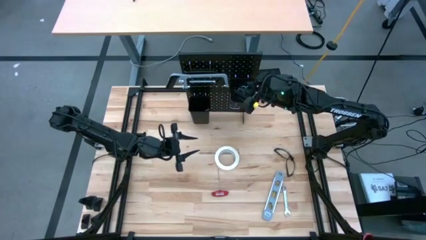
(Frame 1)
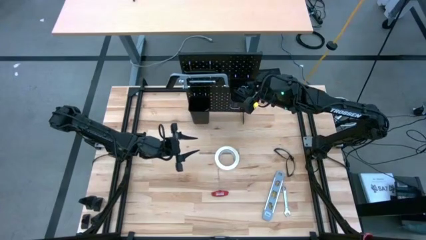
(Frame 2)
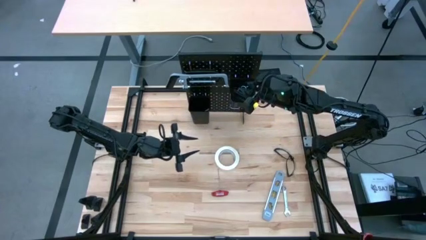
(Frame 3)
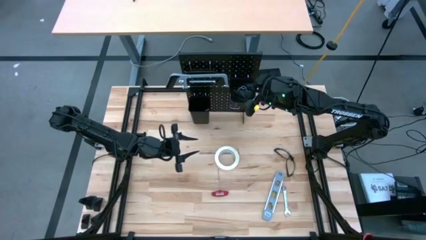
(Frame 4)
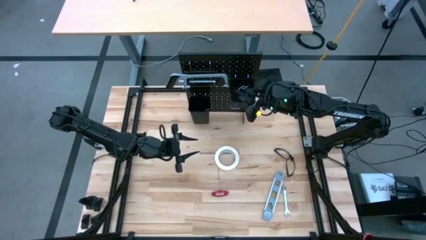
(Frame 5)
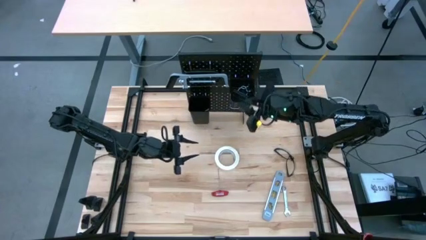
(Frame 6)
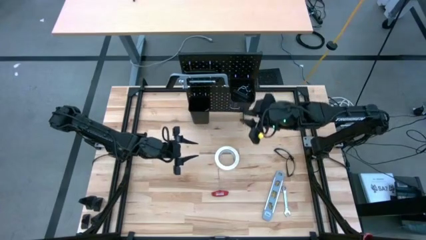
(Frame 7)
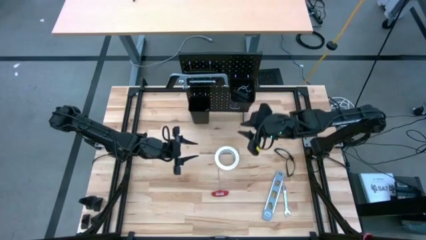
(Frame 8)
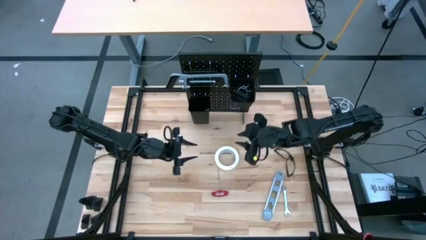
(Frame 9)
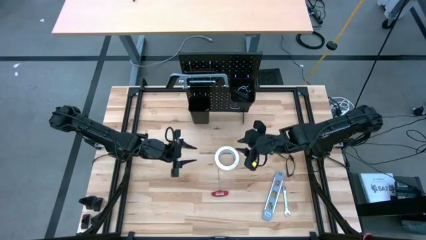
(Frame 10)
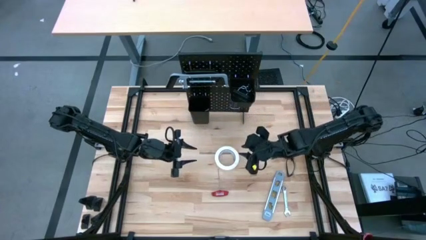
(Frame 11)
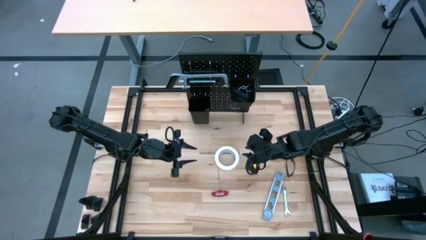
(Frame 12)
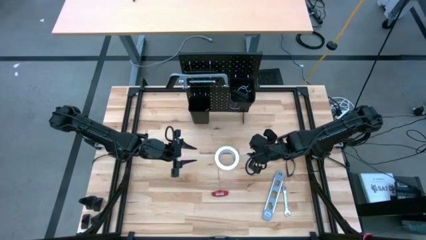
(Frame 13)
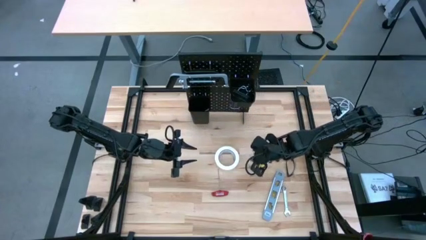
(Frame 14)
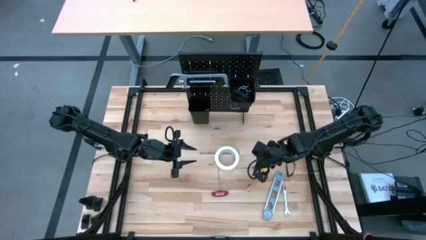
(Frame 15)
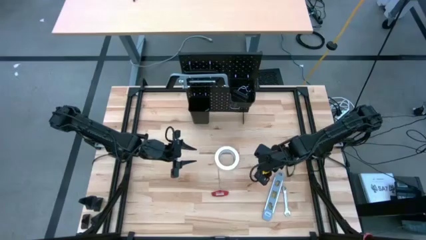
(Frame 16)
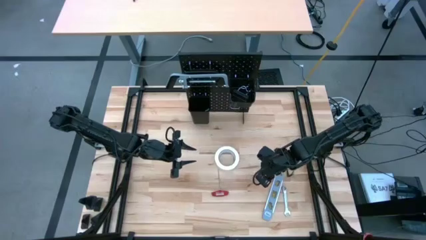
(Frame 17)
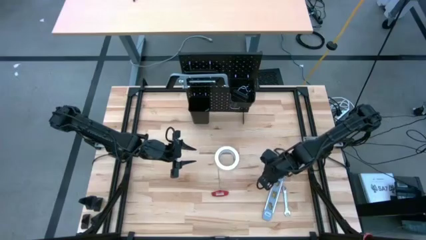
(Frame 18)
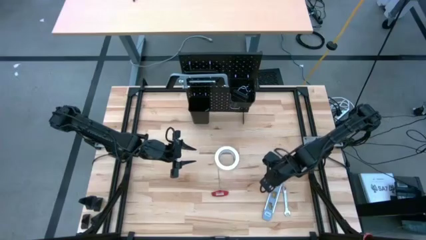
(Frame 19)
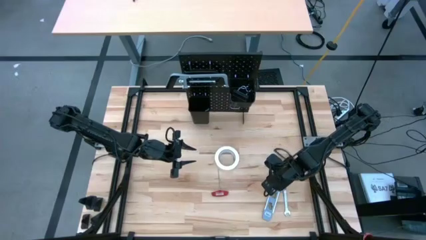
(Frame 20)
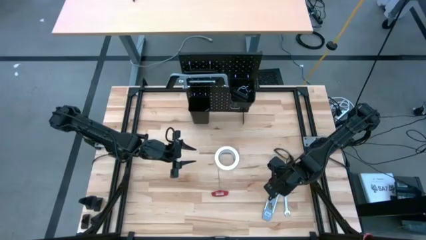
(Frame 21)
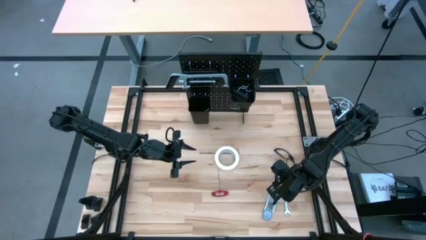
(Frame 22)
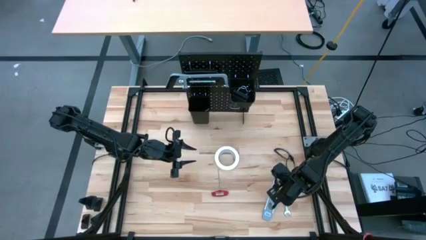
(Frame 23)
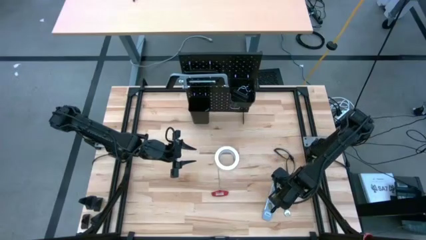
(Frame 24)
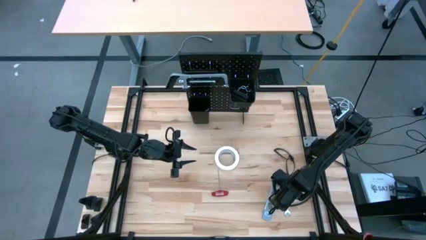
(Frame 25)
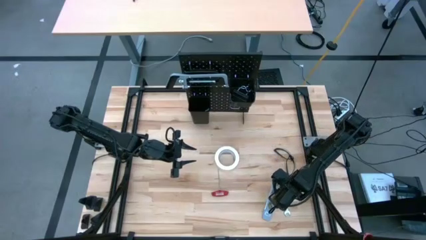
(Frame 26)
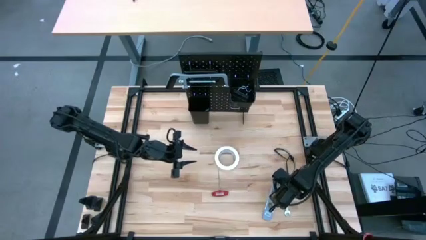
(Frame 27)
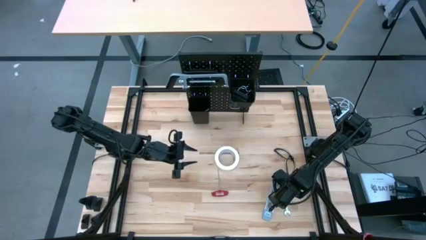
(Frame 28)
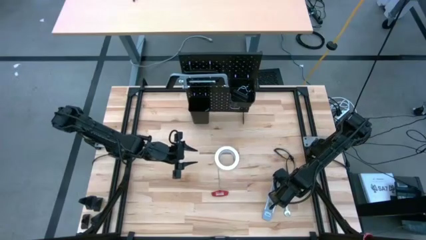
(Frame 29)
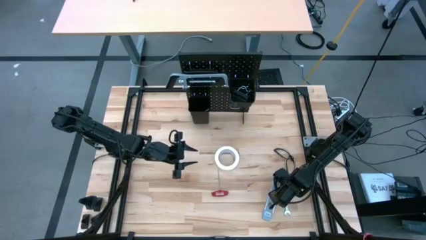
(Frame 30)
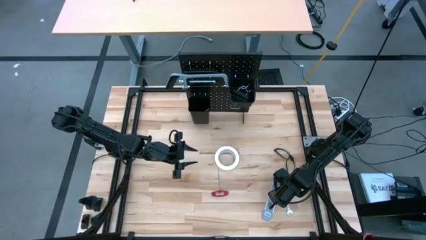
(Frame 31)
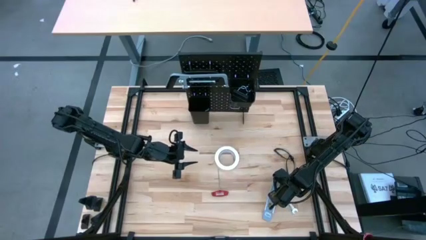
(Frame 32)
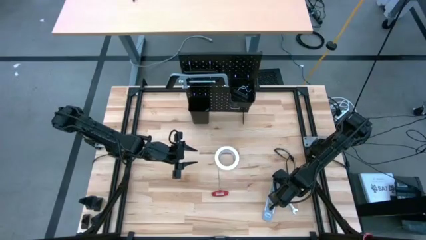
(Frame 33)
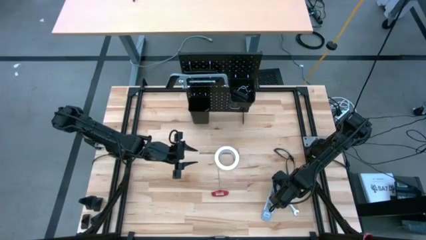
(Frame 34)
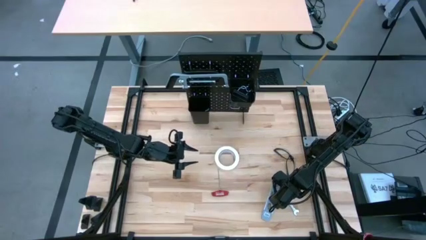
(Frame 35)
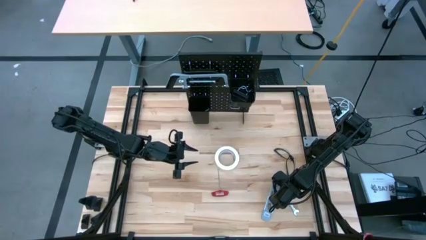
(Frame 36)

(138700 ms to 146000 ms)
Task: Hang tools onto peg board
Put the silver wrench into the right black tool bin

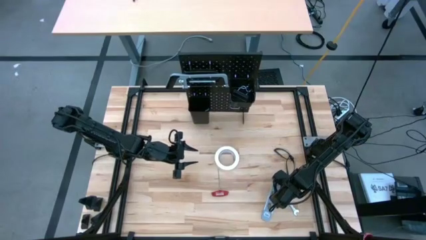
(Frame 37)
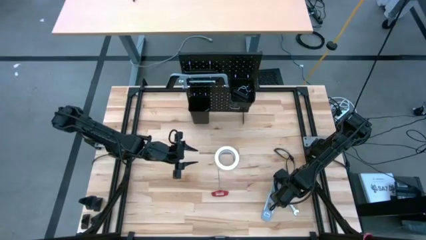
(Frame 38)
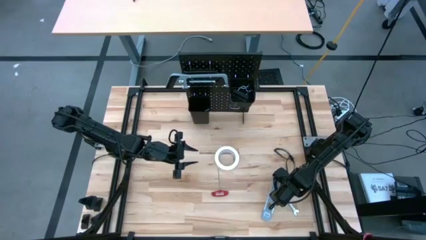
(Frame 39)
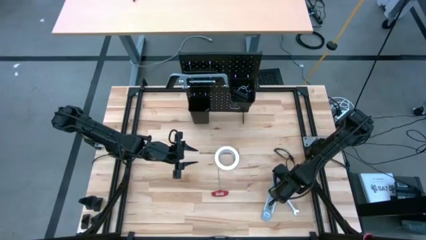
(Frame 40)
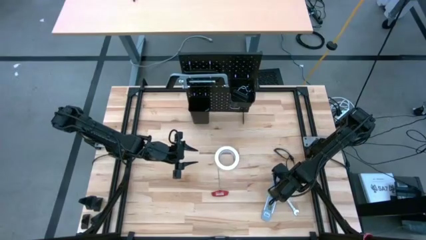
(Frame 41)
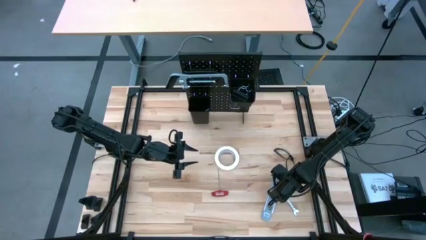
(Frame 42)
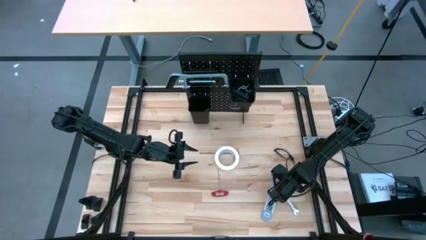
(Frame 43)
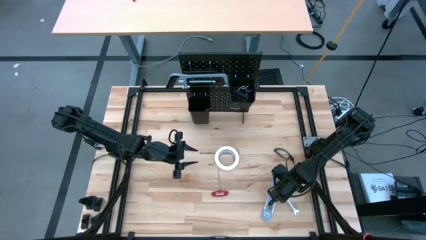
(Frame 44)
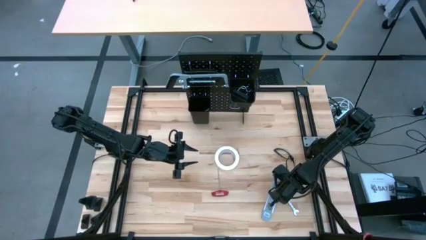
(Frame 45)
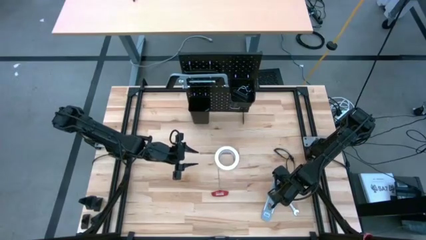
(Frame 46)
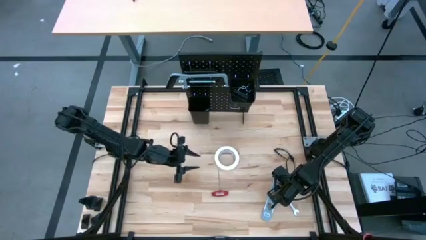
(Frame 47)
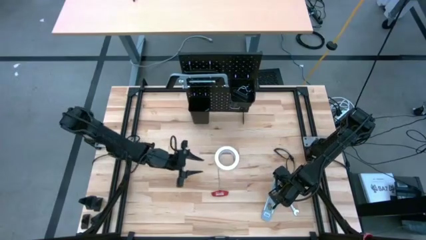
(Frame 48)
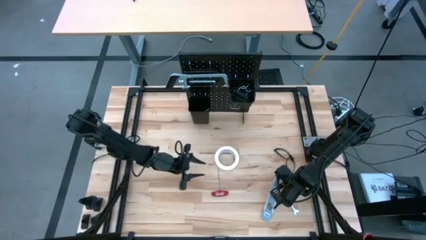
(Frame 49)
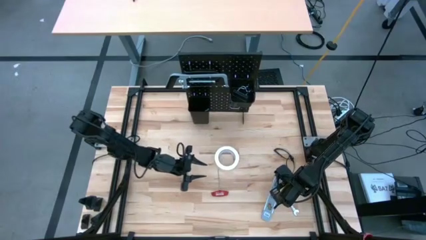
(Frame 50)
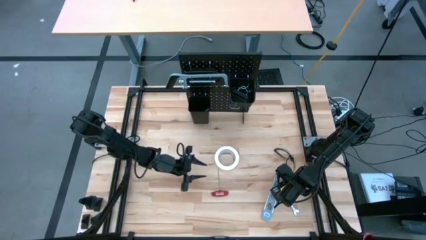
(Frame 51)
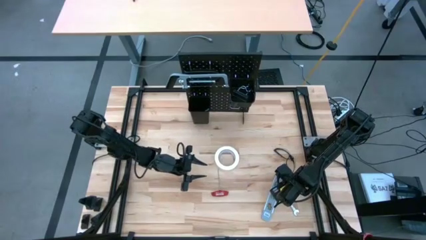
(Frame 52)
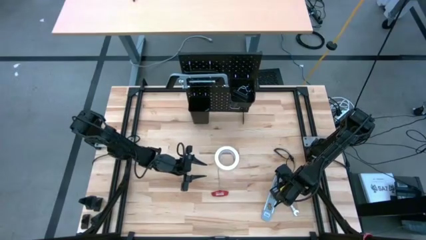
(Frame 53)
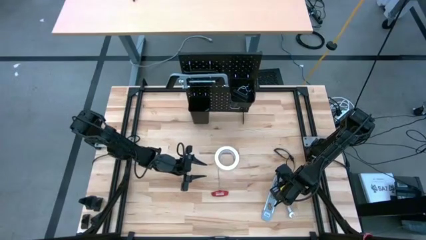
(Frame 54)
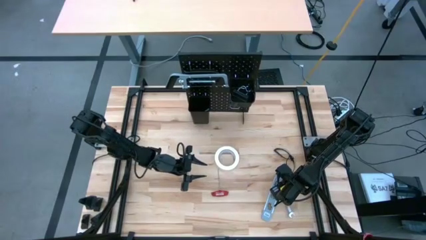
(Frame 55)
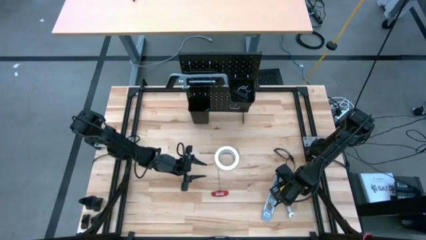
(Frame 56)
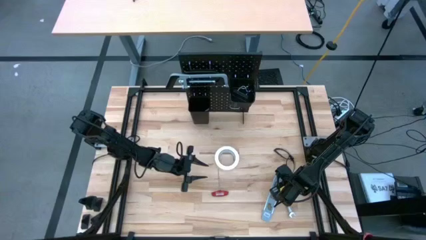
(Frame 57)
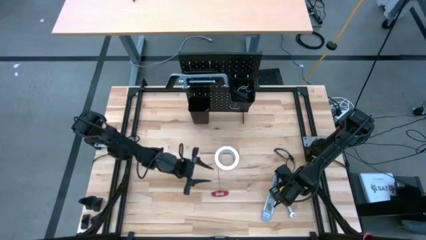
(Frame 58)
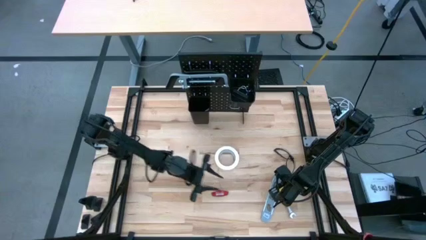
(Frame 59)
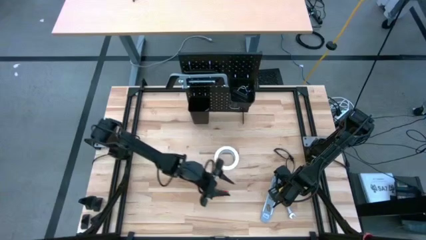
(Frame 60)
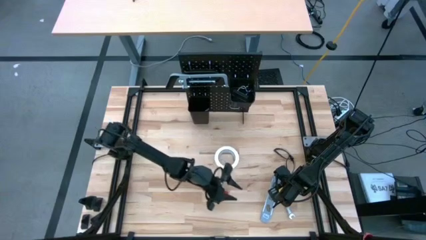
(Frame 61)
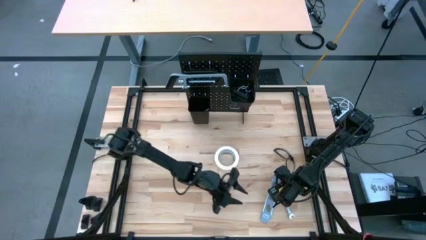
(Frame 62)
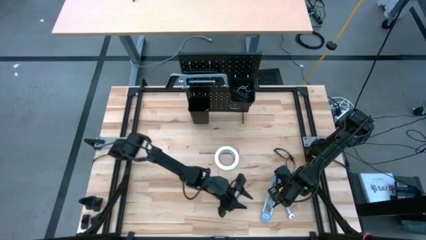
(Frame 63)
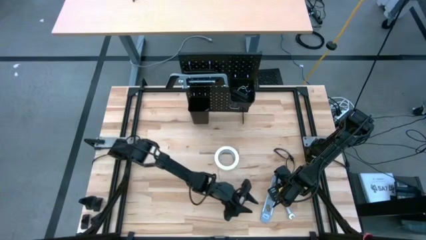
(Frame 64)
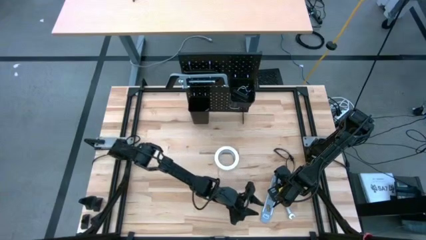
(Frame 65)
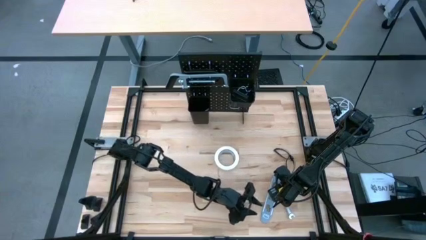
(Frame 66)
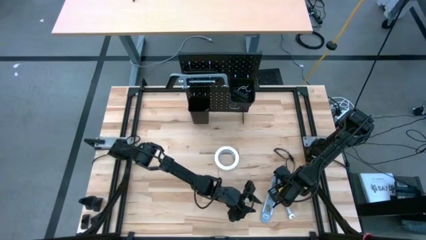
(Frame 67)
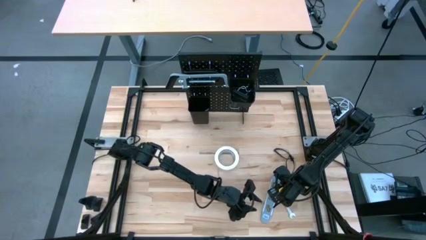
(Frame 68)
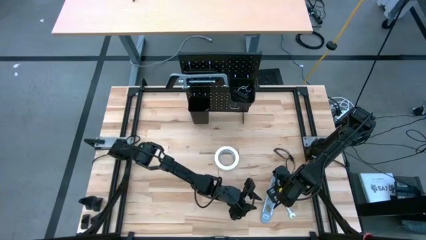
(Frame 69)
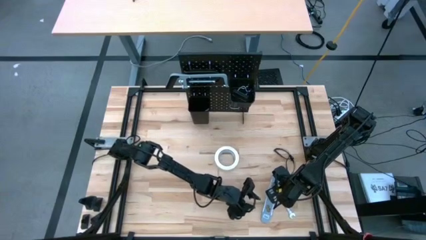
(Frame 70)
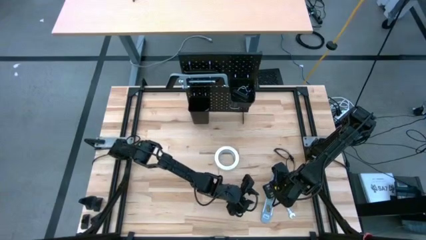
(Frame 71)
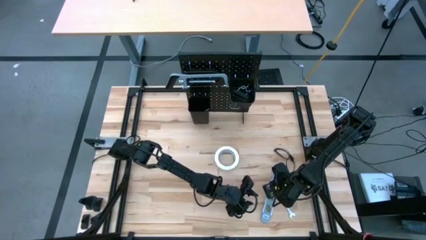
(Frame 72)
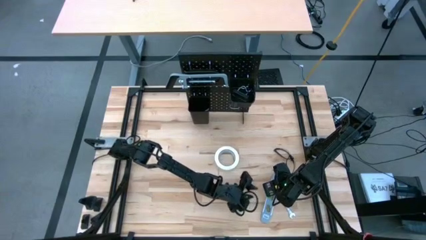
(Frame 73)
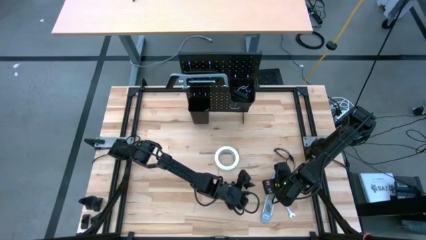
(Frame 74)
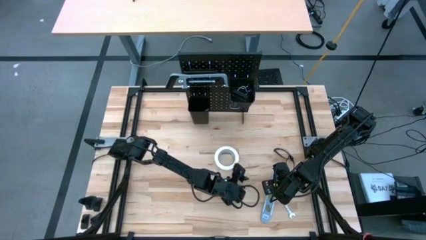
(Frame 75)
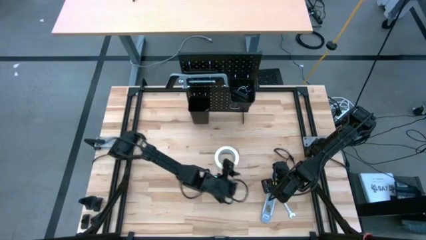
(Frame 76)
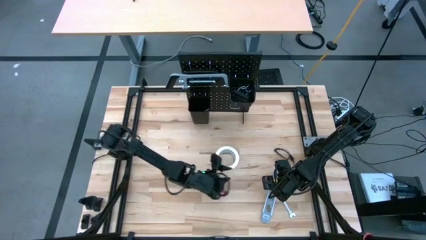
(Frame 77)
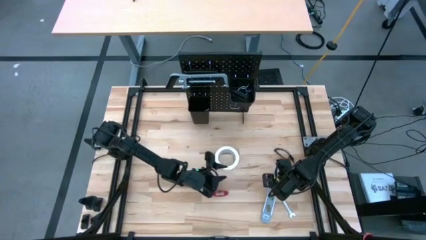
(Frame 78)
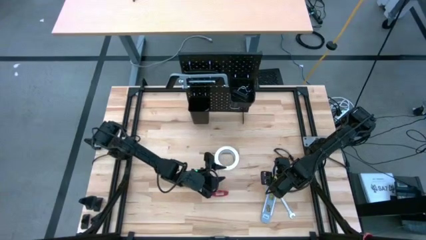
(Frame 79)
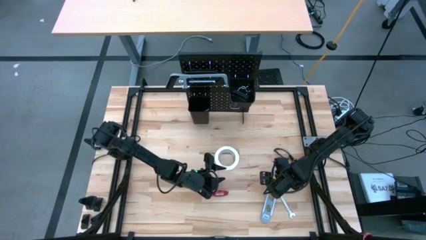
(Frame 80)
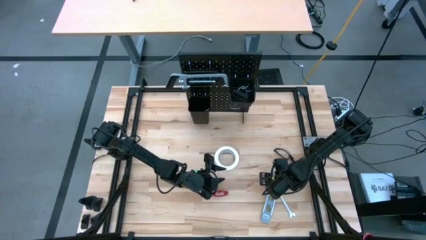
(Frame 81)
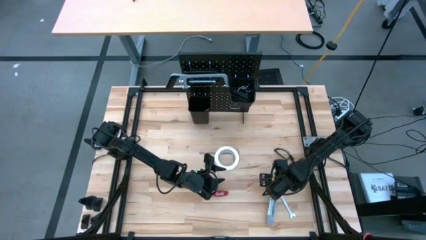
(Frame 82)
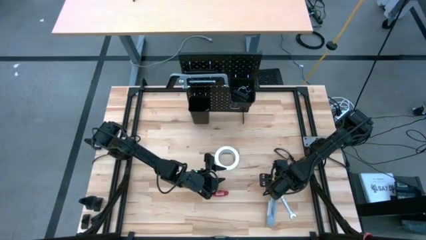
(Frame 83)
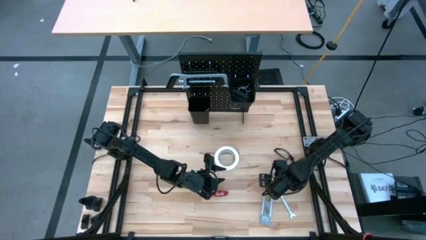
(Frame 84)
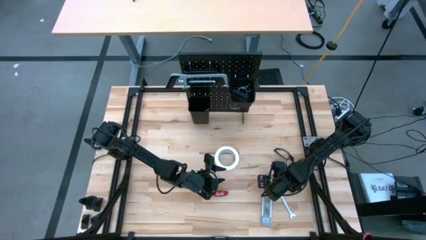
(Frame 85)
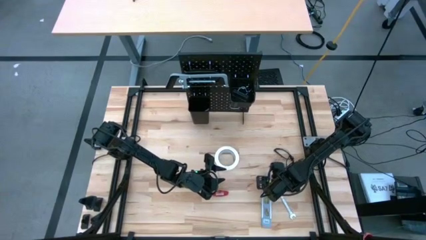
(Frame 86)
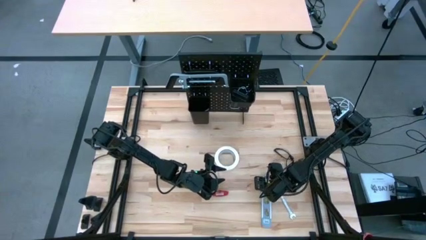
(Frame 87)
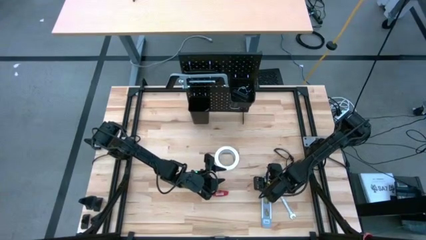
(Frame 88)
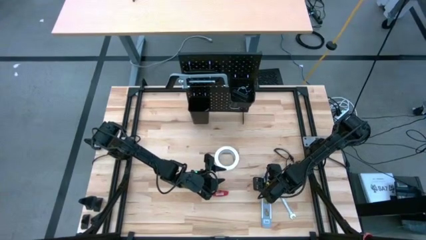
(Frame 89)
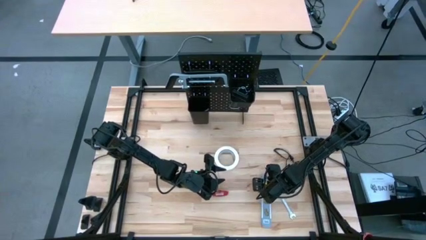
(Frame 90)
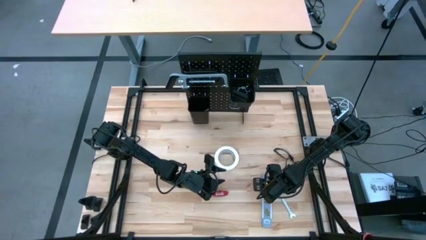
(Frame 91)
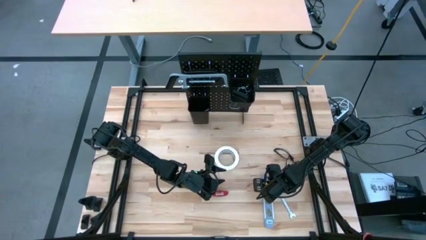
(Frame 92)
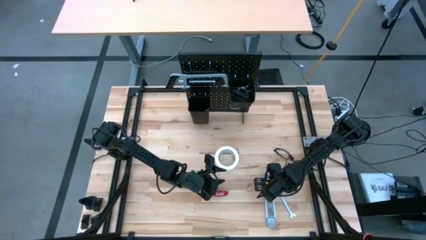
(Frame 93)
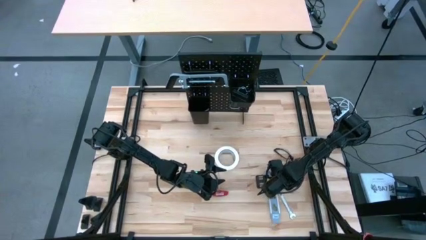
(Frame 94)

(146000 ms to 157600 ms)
Put the gray level into the left black tool bin
